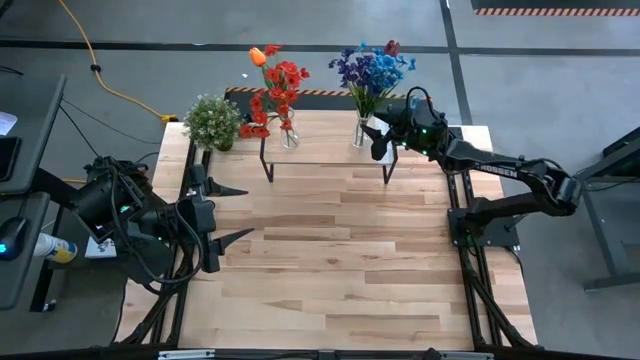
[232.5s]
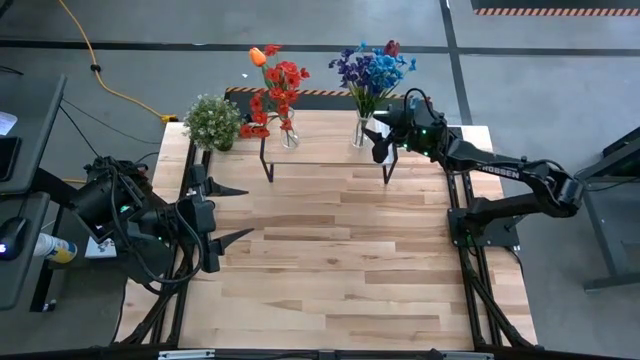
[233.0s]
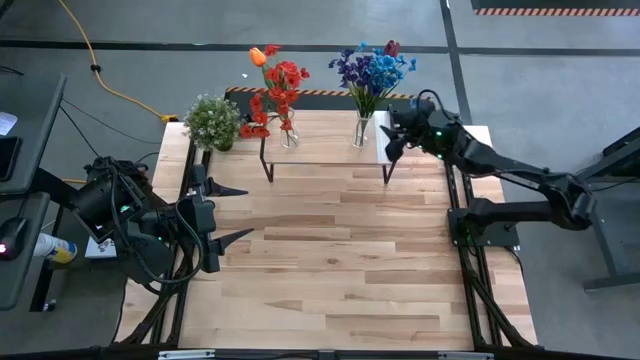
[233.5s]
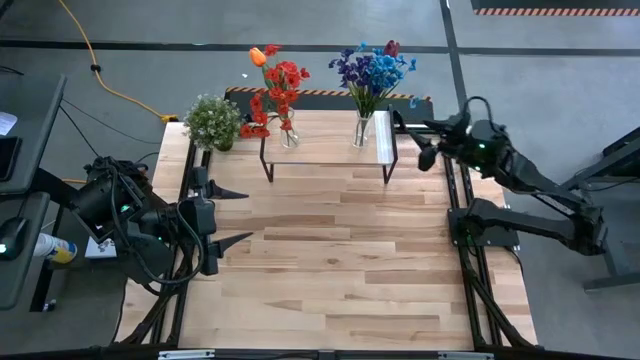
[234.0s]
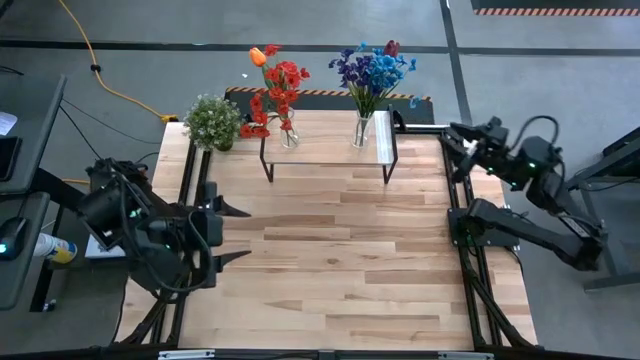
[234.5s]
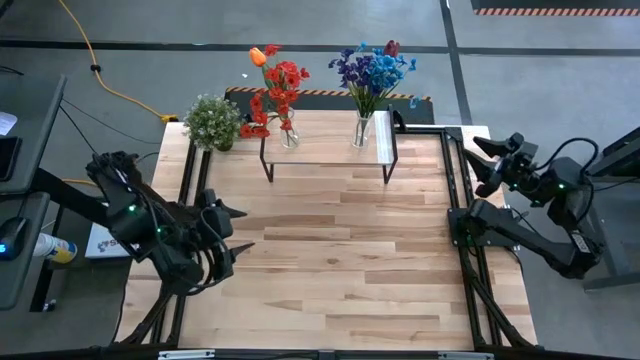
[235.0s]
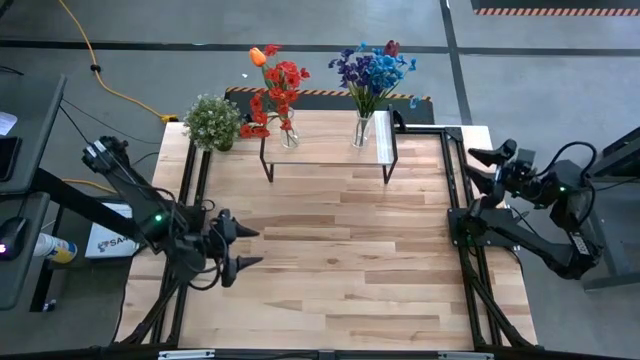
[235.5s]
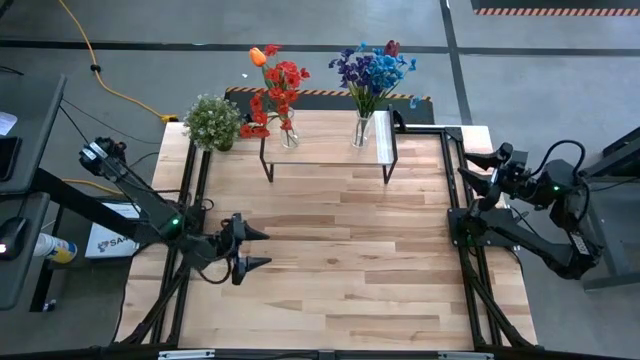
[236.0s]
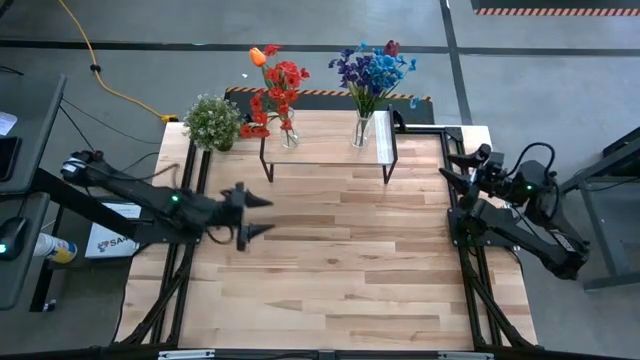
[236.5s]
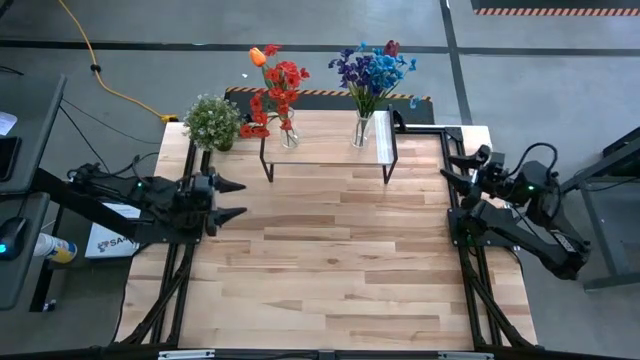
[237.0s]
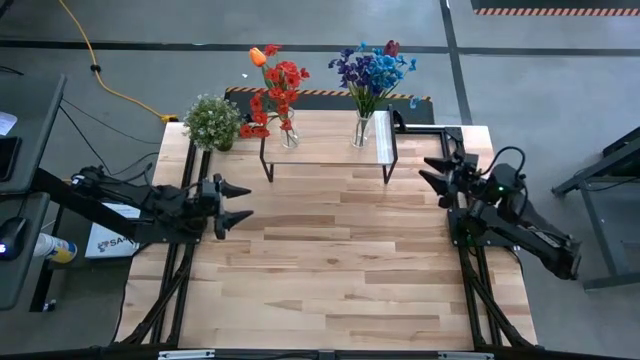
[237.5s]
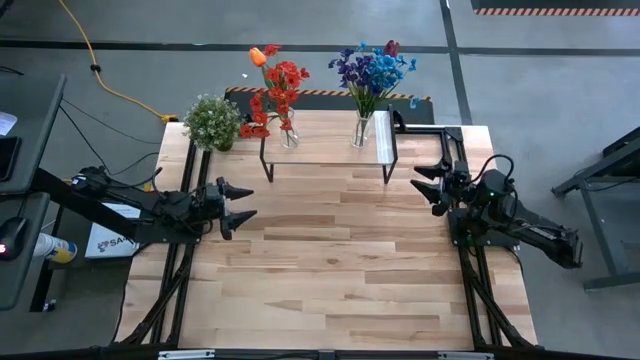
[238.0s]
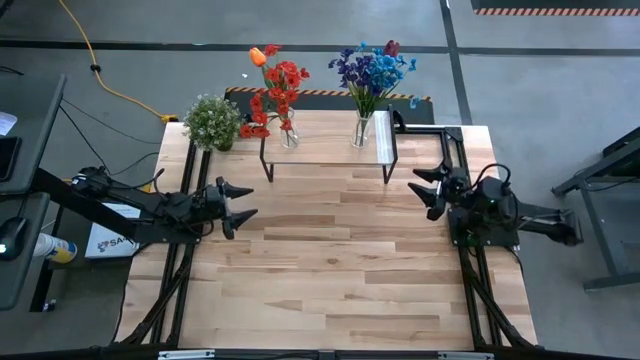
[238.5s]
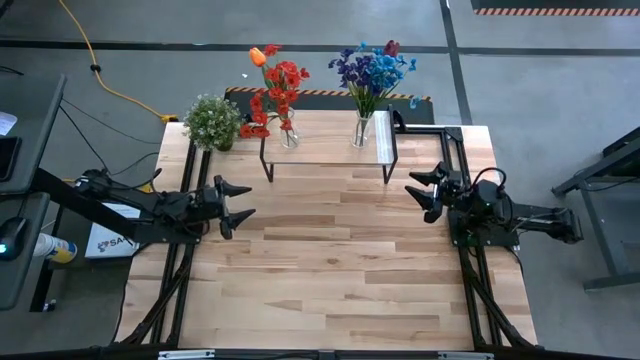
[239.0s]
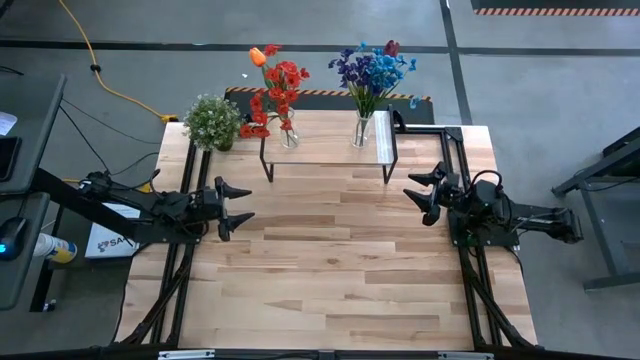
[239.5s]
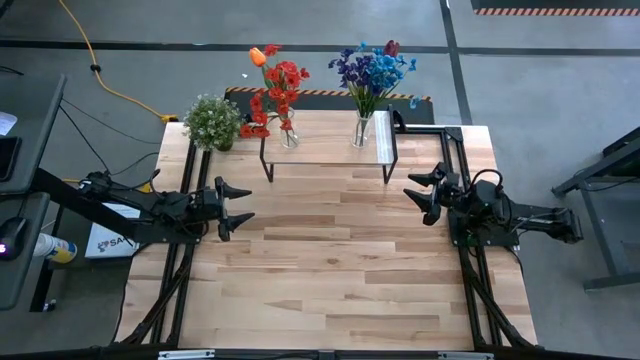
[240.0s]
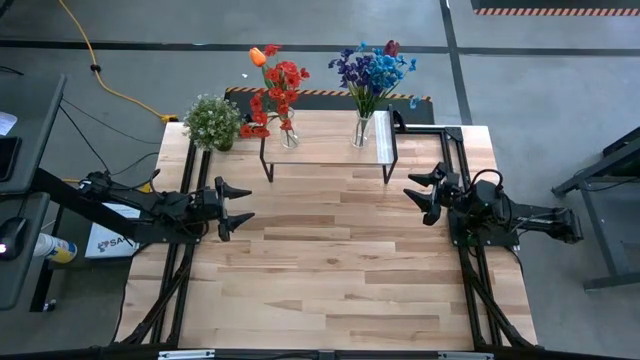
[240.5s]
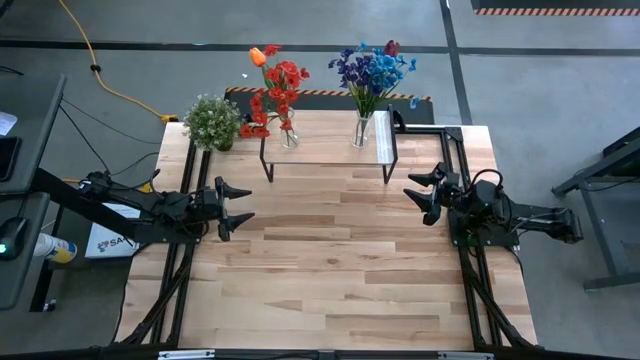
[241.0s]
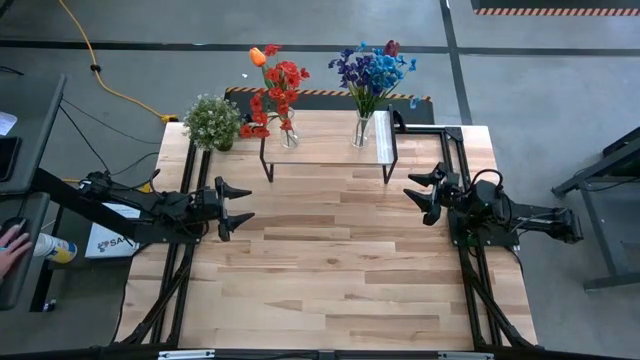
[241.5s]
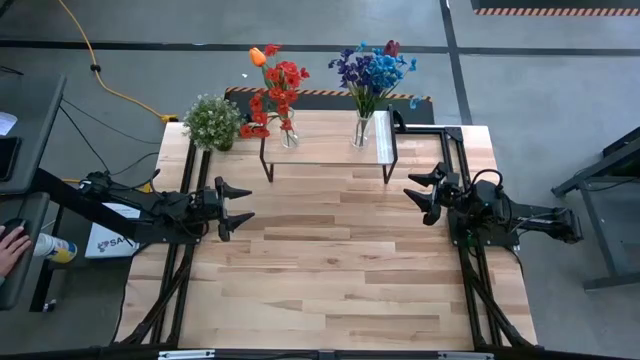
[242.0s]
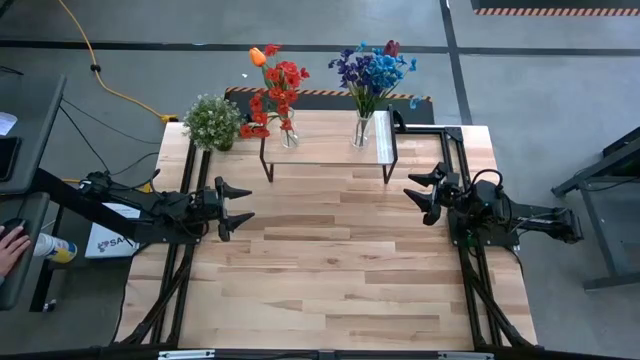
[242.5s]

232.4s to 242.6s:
Task: Pick and place flowers into a vace then onto a shelf
Return to Home Position

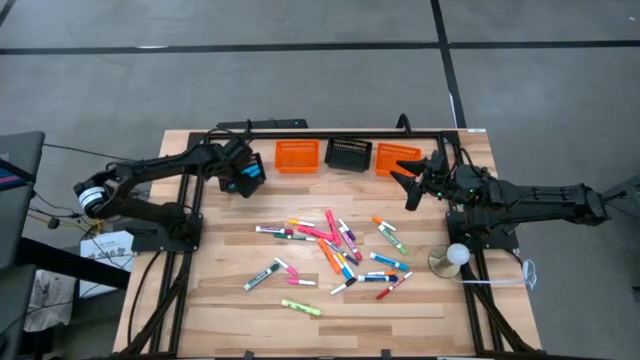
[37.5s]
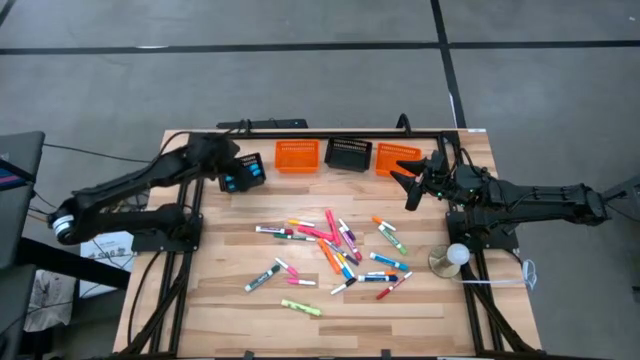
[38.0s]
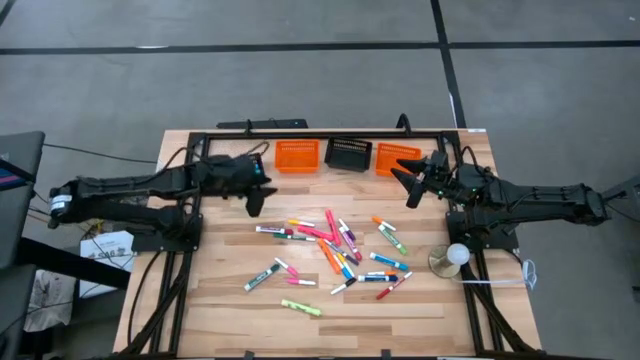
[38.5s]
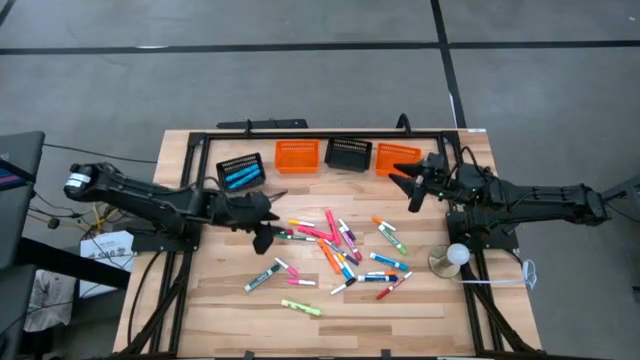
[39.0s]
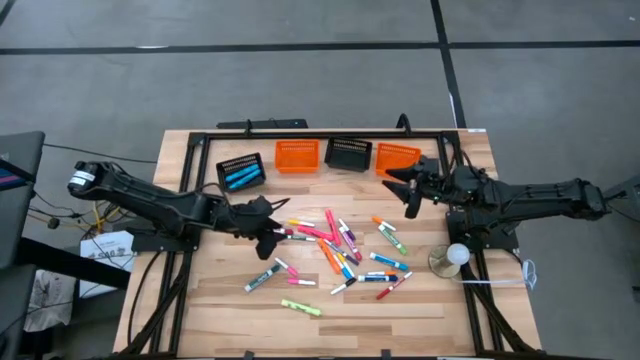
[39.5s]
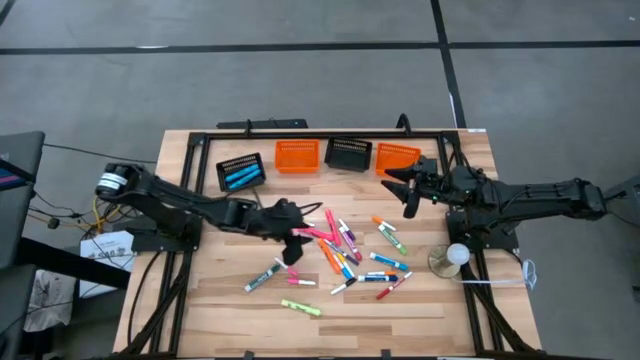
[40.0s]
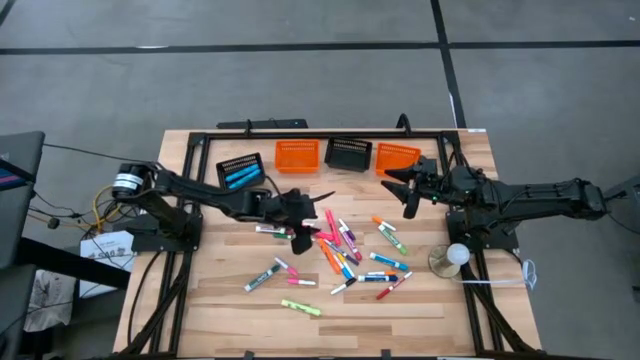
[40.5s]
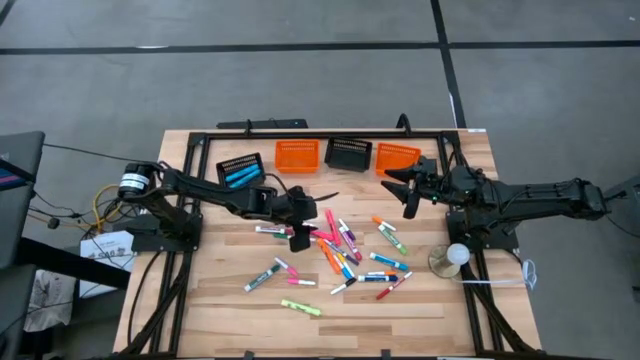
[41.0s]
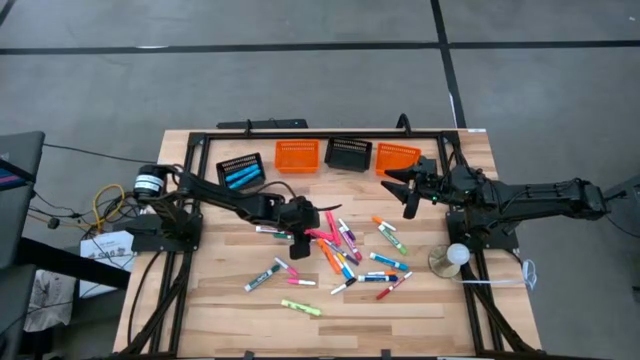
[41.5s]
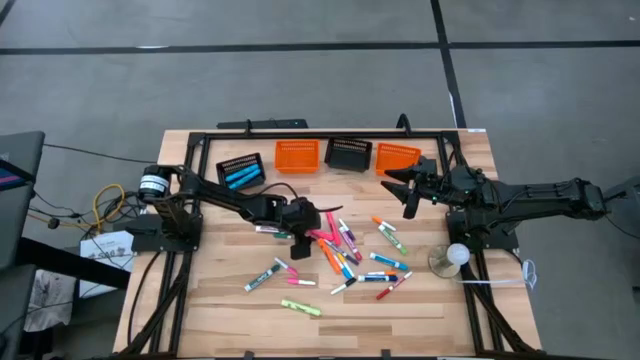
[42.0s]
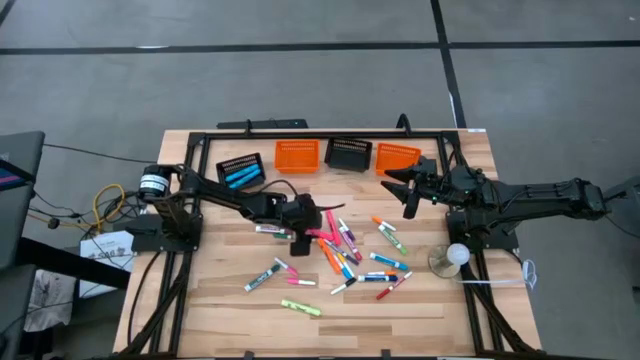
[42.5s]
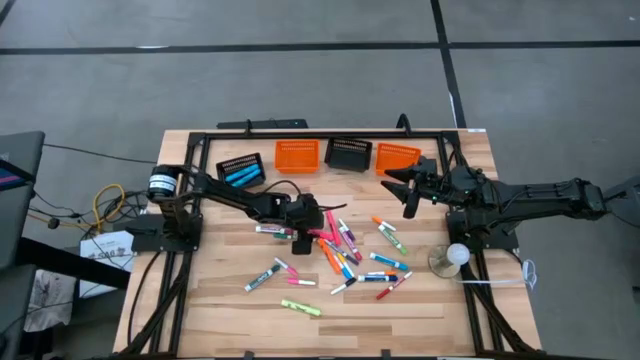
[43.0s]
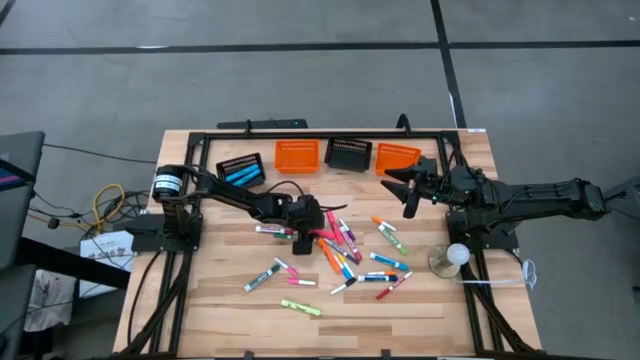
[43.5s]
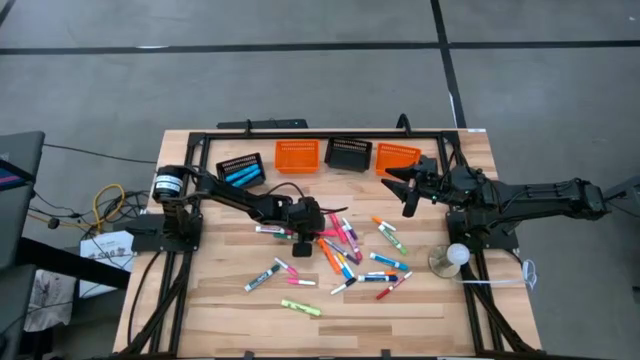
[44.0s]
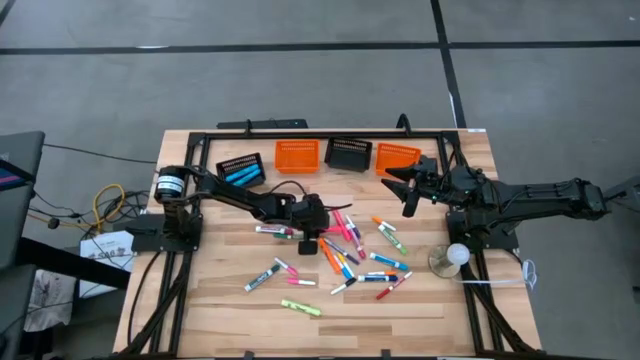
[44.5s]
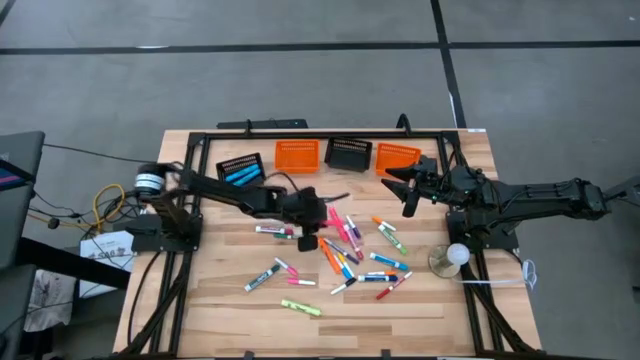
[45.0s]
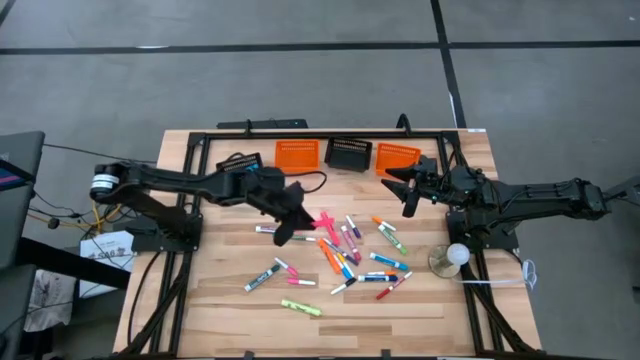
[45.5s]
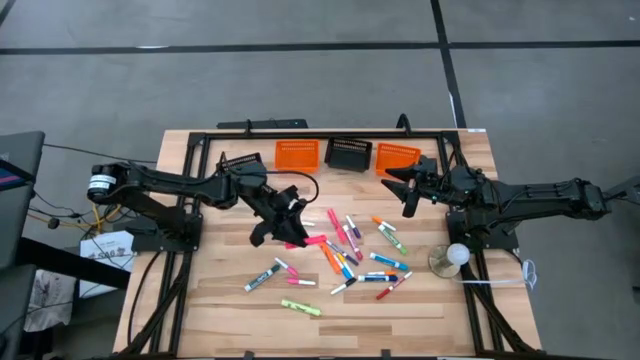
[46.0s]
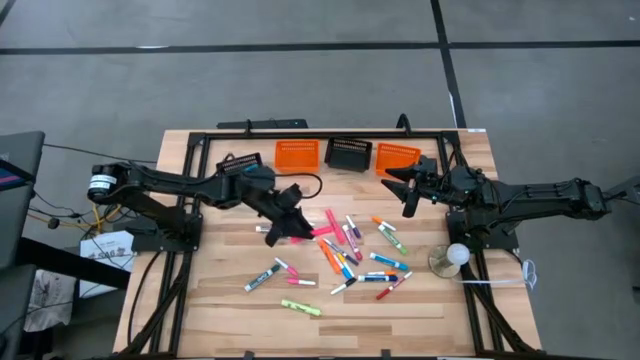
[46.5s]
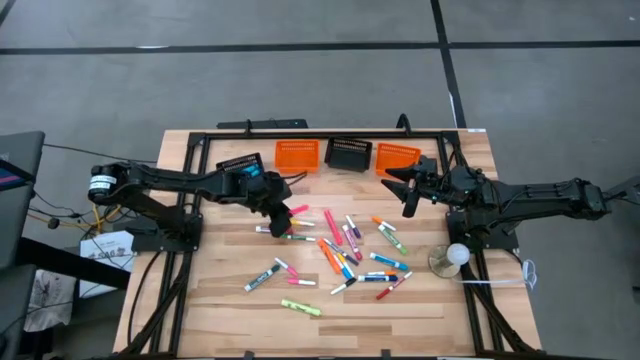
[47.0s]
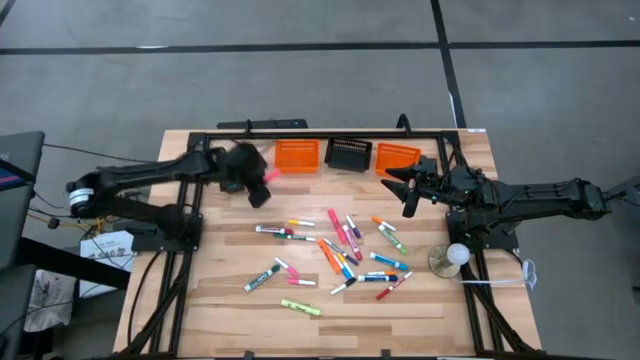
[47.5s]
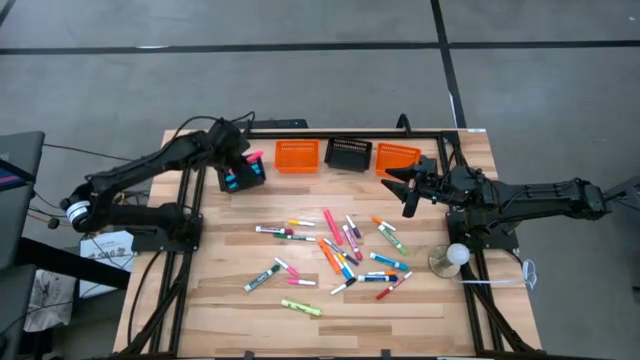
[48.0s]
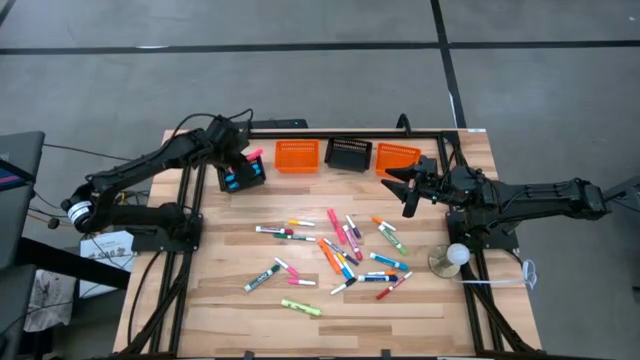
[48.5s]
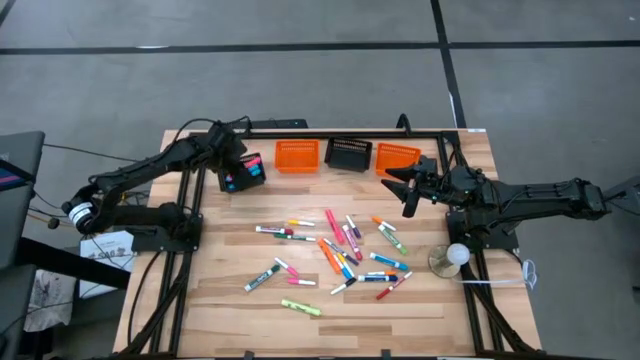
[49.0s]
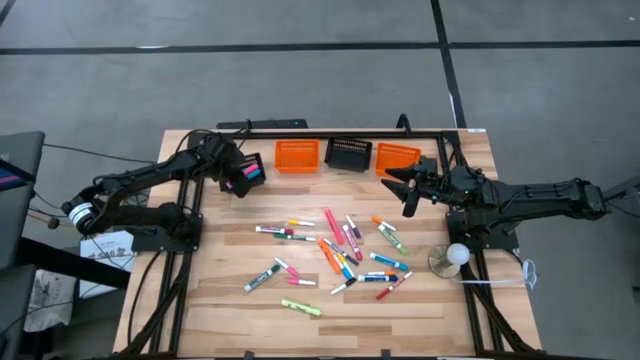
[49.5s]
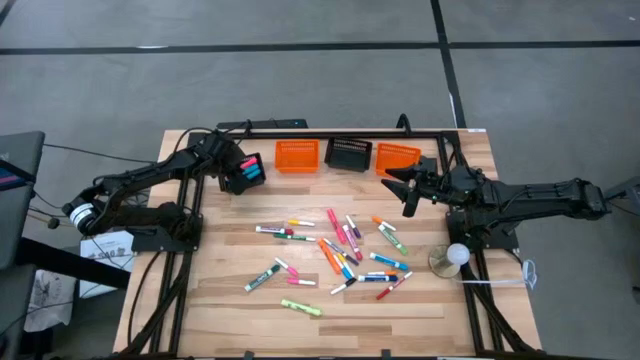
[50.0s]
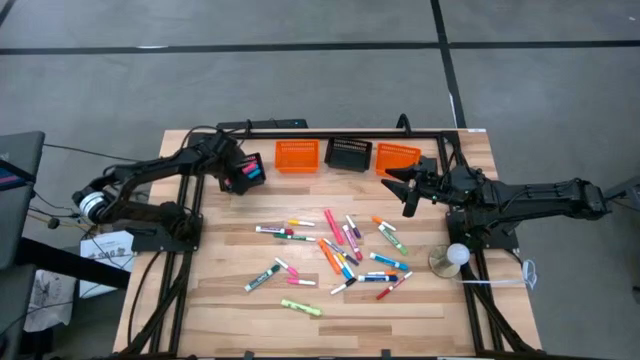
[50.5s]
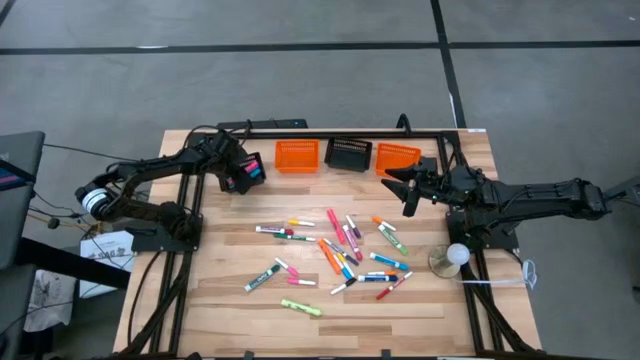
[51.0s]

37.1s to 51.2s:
Task: Pick & Place Markers
Put the large pink highlighter pen into the left black bin
